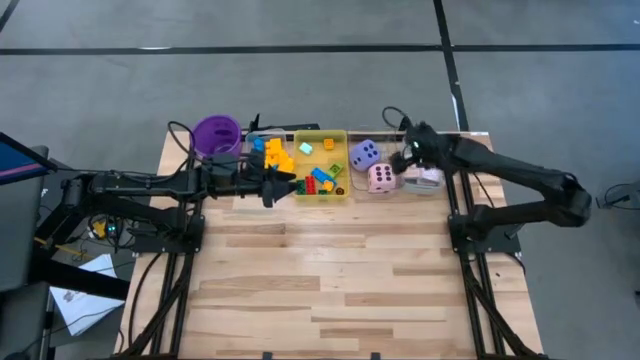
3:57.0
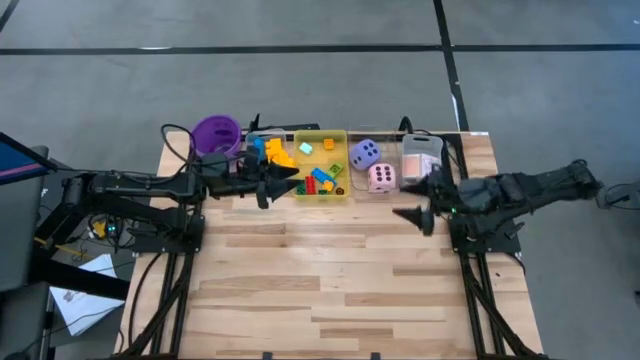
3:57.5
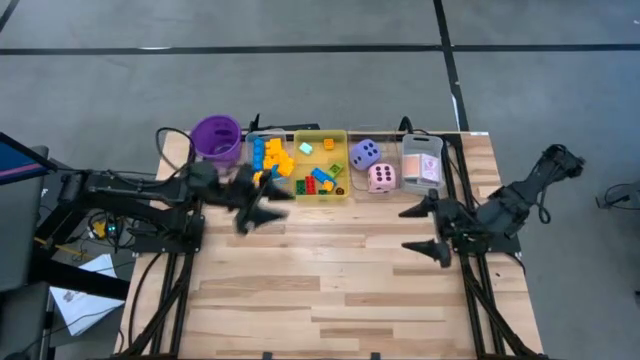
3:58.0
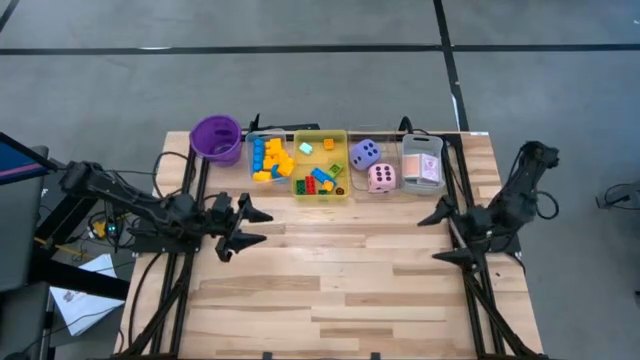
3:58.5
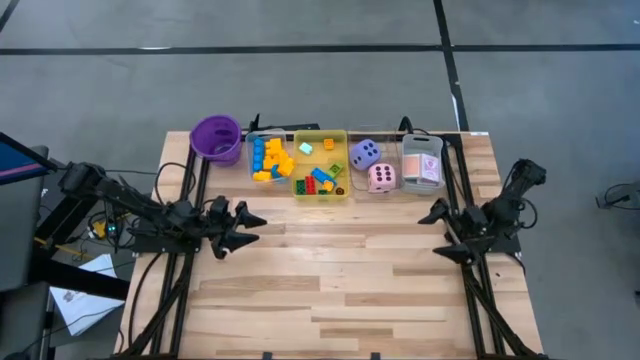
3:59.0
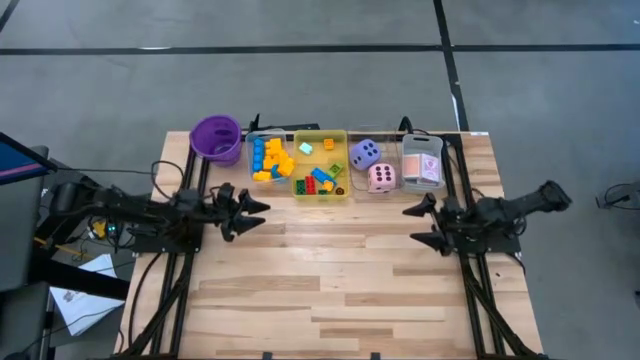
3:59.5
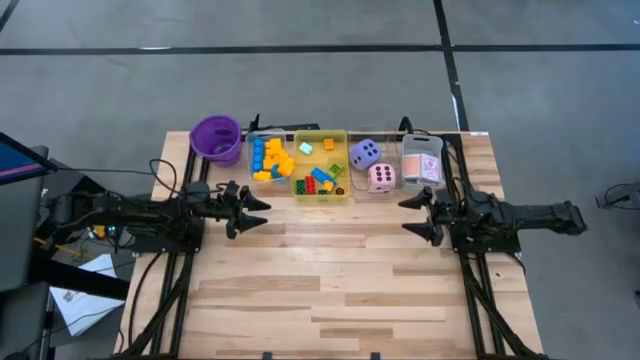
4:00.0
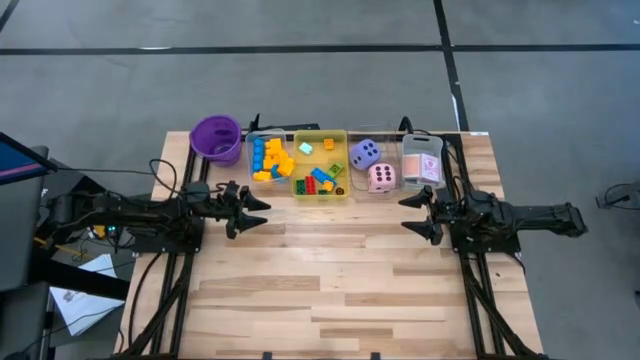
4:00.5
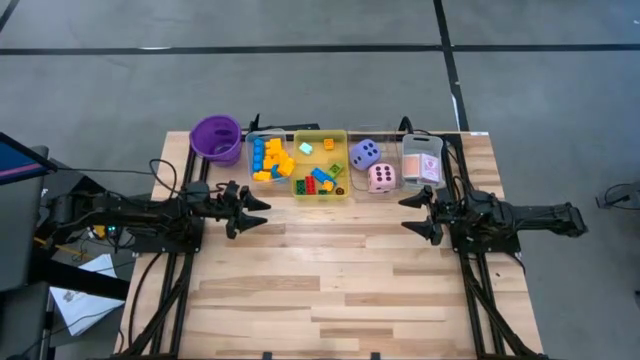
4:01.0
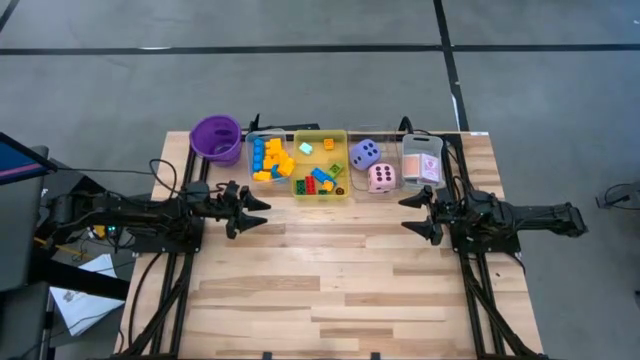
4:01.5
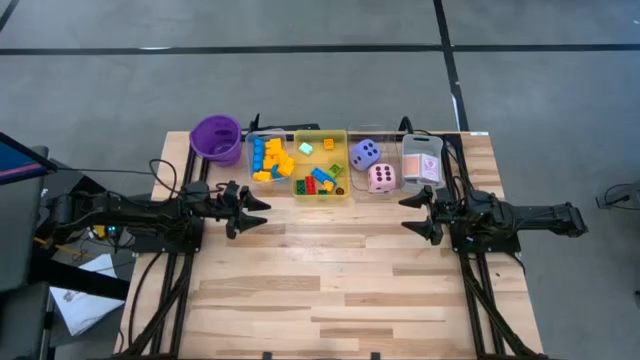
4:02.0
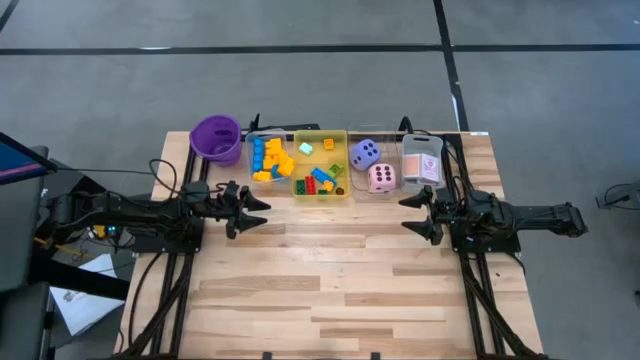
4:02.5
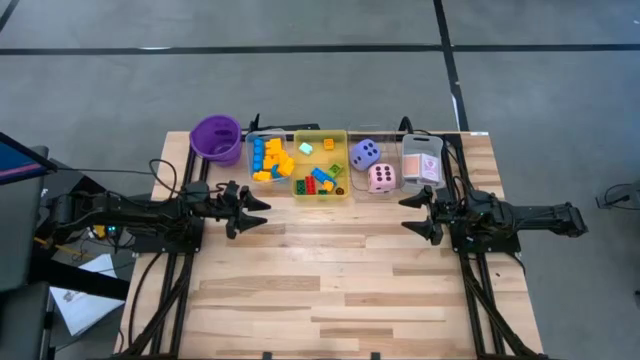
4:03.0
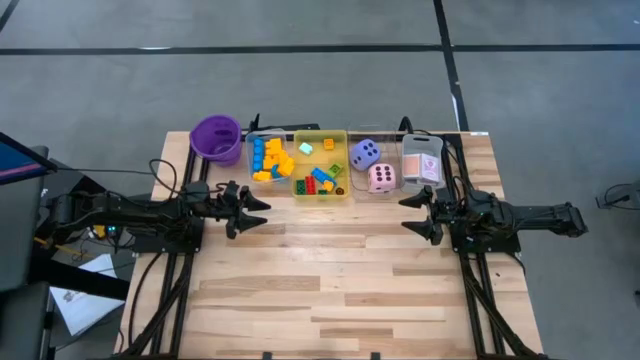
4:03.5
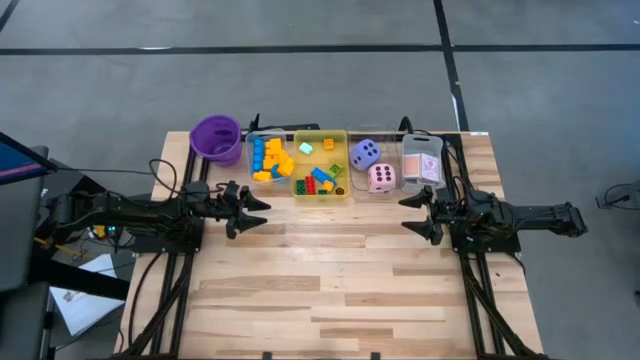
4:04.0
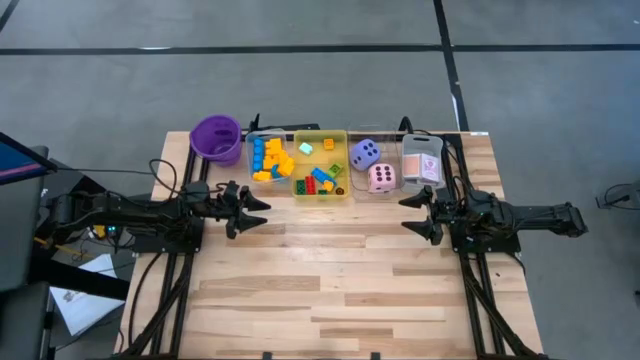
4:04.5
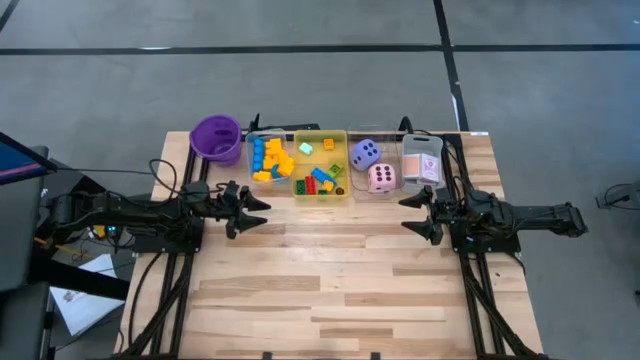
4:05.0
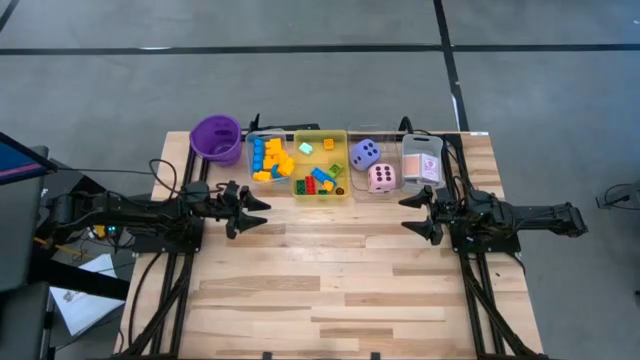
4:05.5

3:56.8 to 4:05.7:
Task: Pick & Place Toys
Return to Home Position

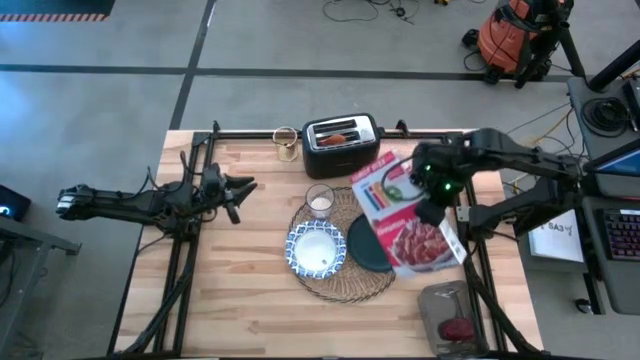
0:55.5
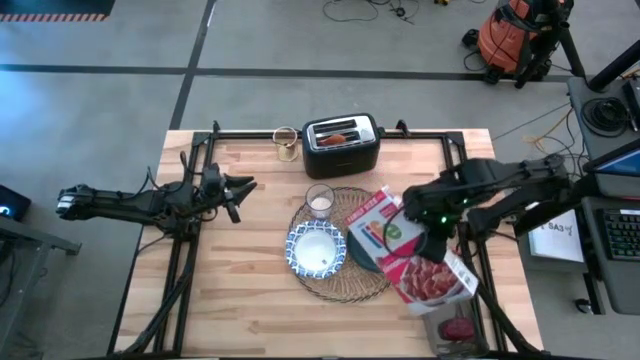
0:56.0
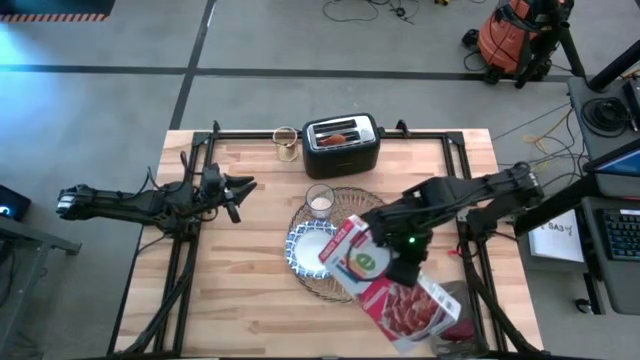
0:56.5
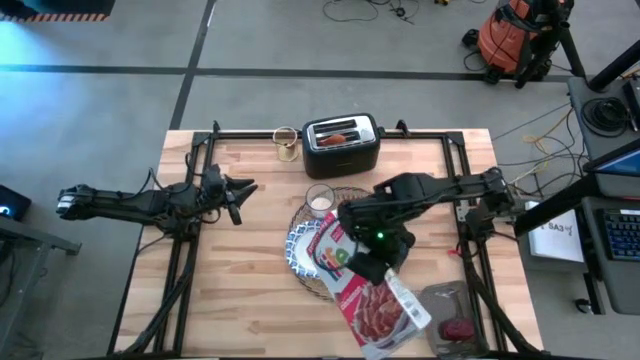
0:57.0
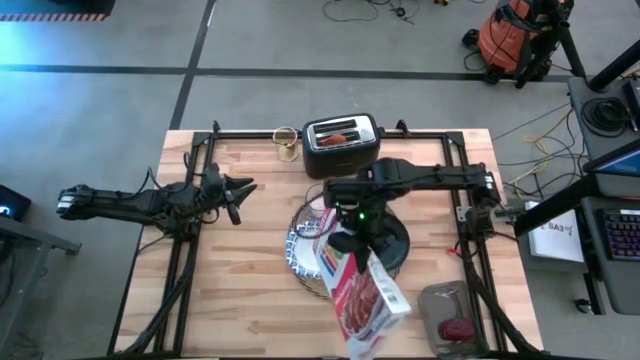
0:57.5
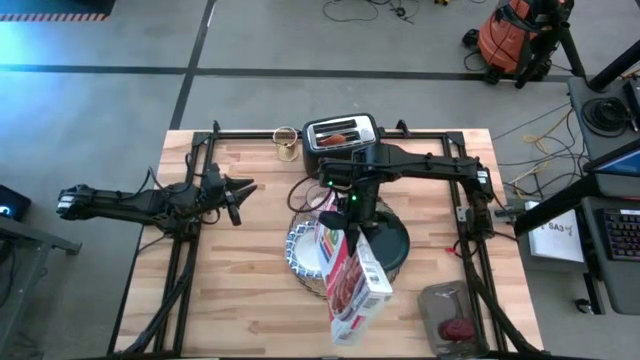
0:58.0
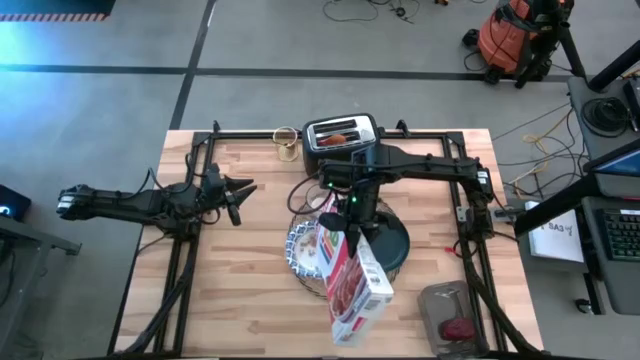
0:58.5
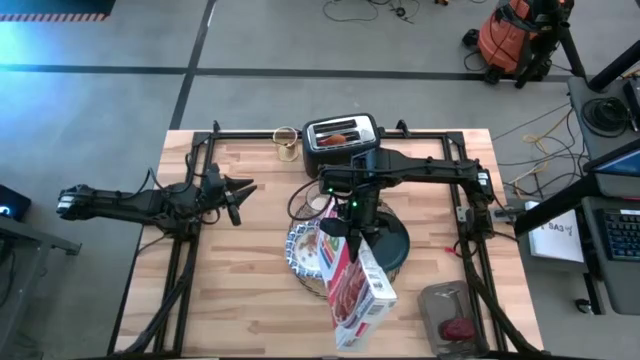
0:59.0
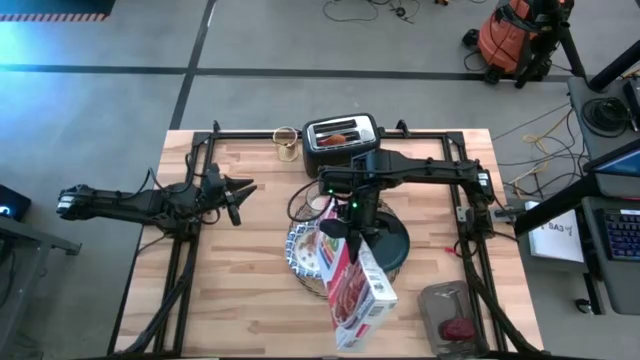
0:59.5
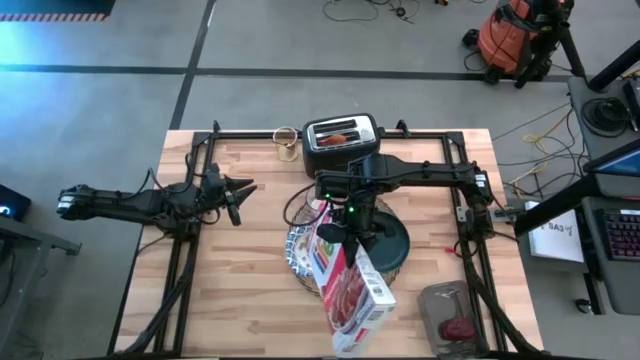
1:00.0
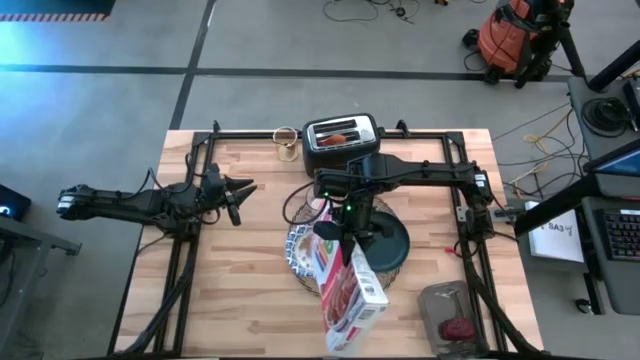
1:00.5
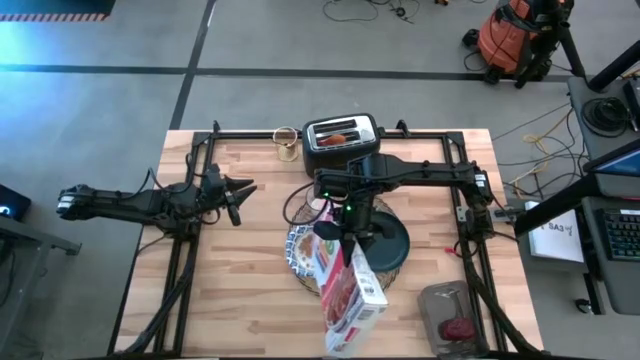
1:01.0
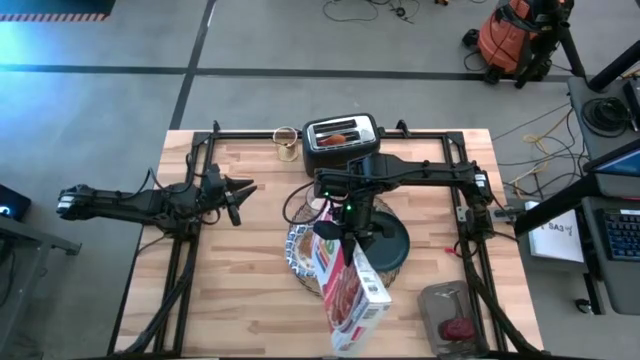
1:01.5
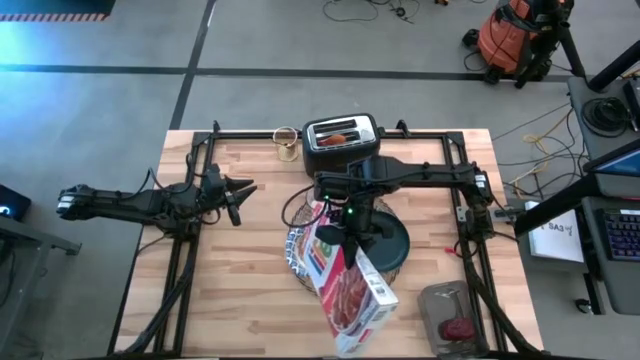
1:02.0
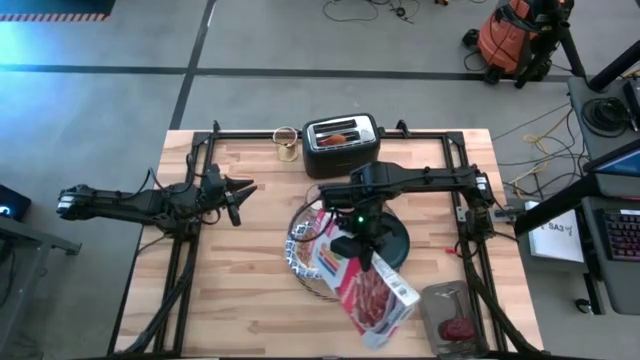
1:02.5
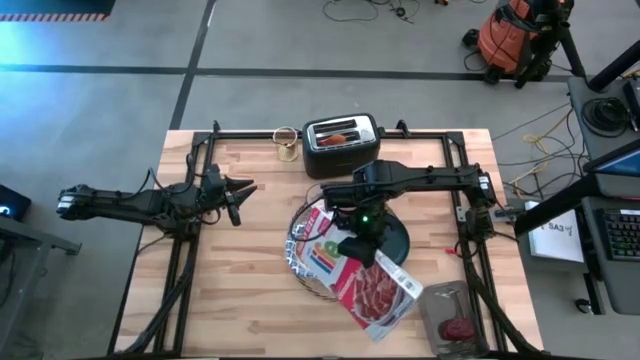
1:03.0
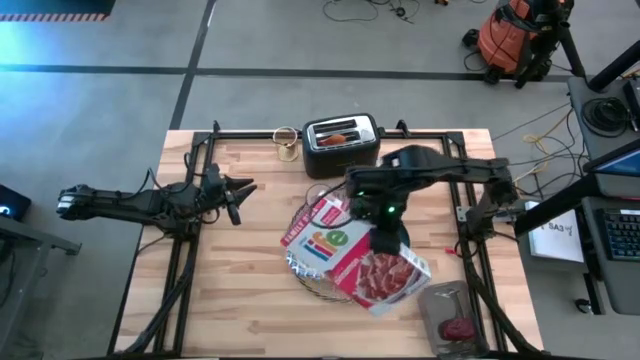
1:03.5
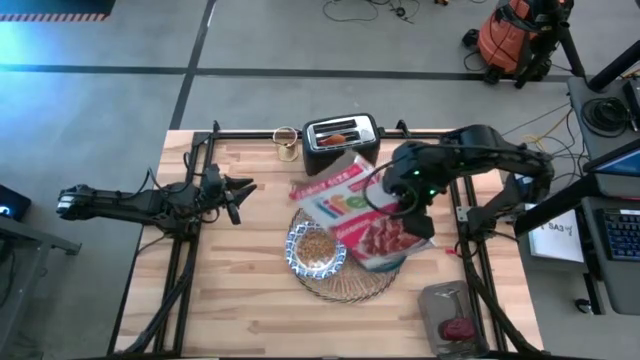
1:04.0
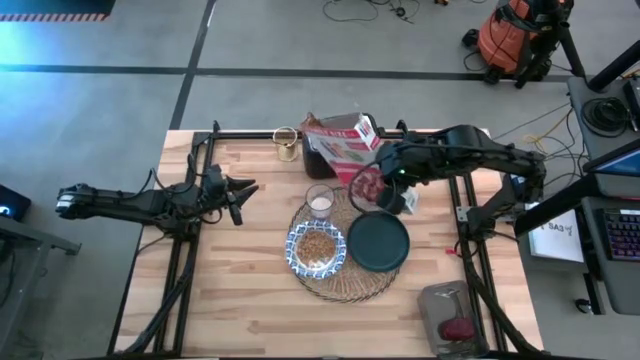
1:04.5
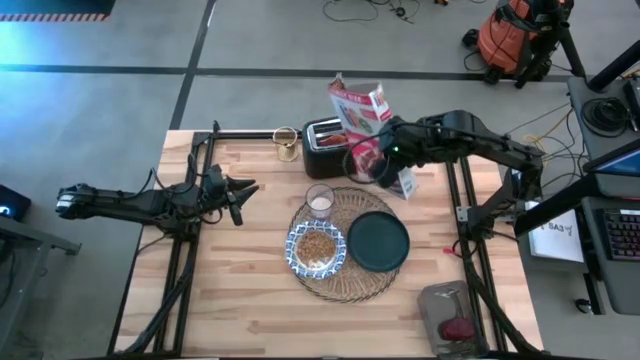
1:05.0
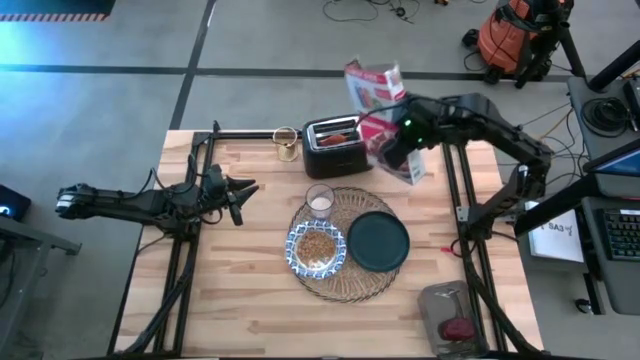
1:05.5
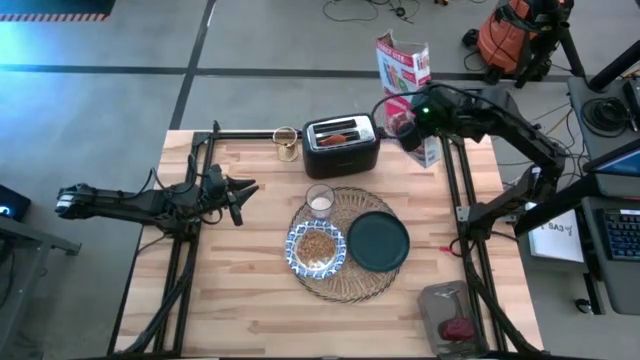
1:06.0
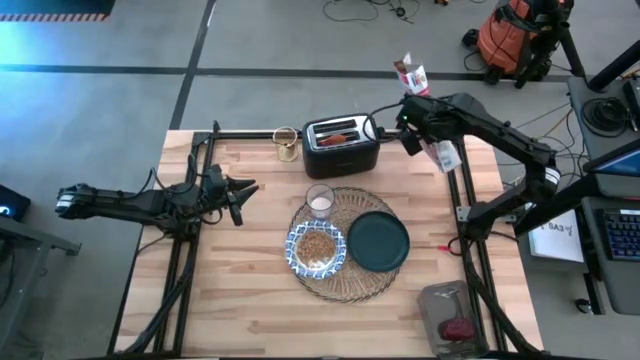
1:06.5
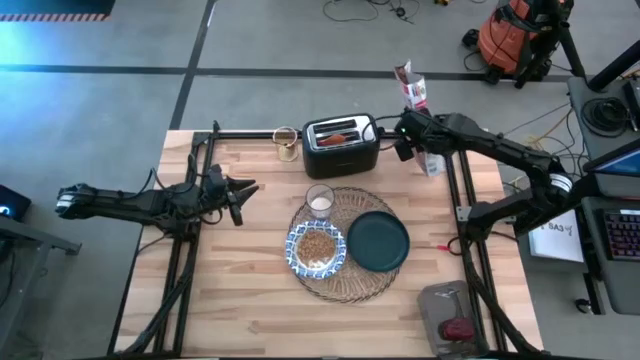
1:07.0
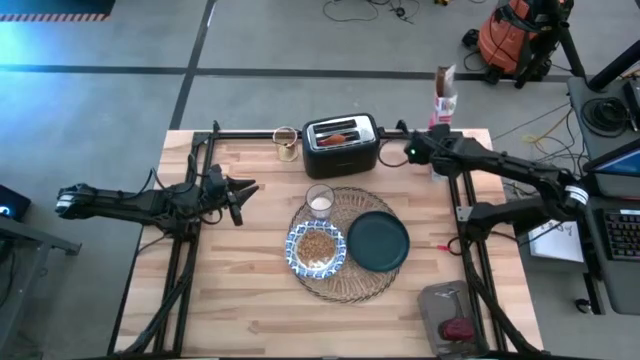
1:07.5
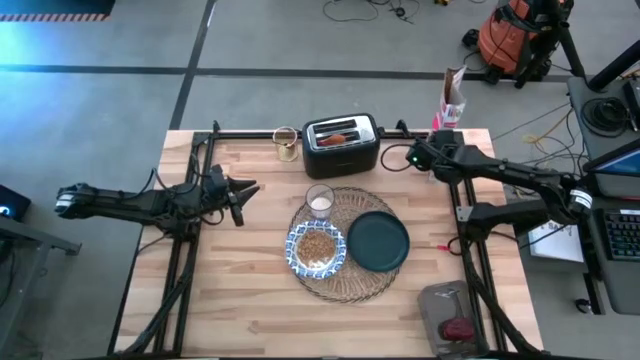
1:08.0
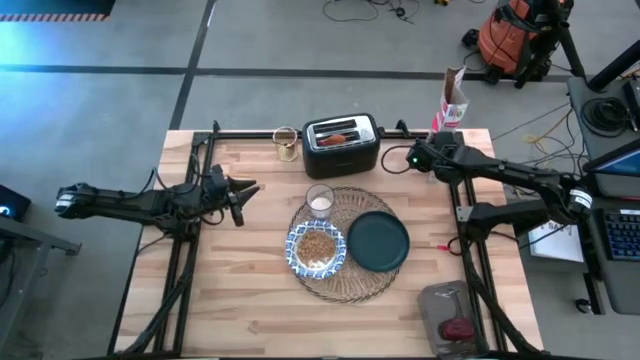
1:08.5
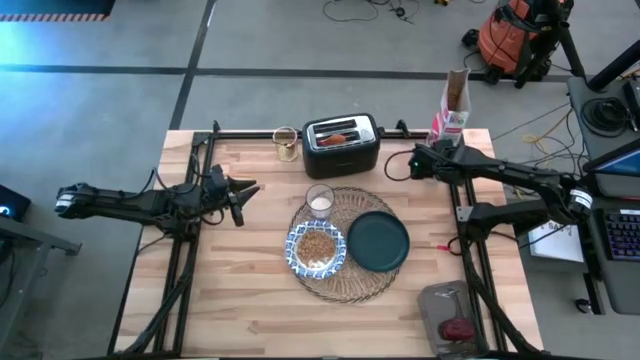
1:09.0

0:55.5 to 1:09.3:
Task: Arrange a breakfast setting
Pour the cereal into the white and blue bowl
